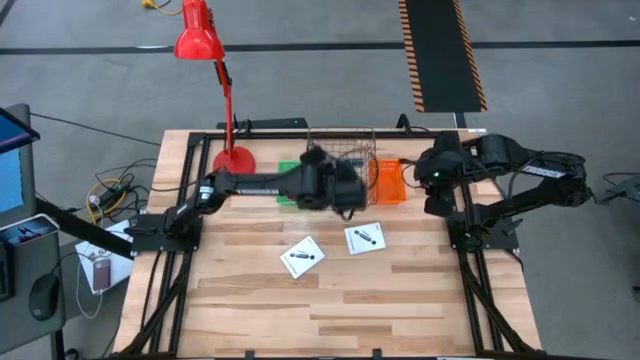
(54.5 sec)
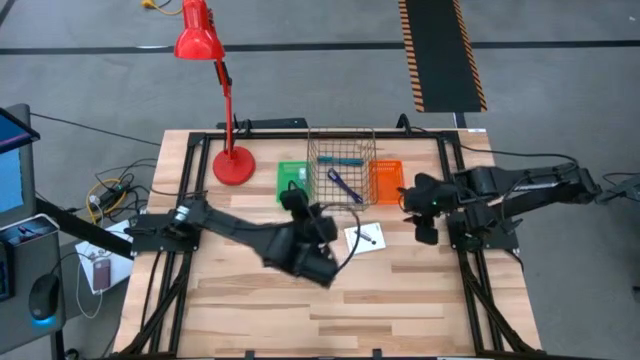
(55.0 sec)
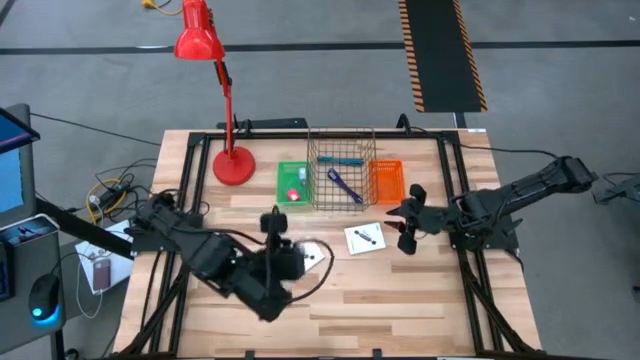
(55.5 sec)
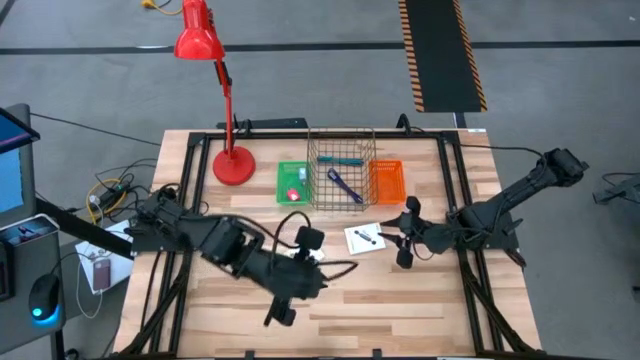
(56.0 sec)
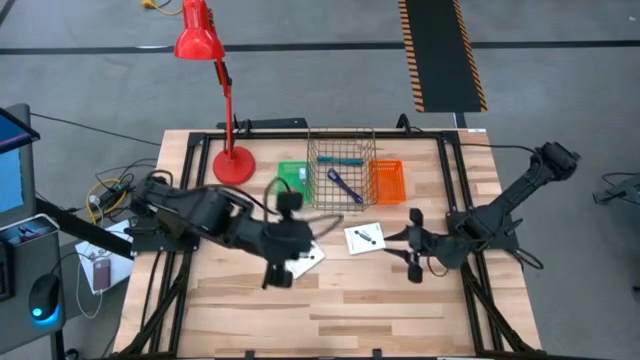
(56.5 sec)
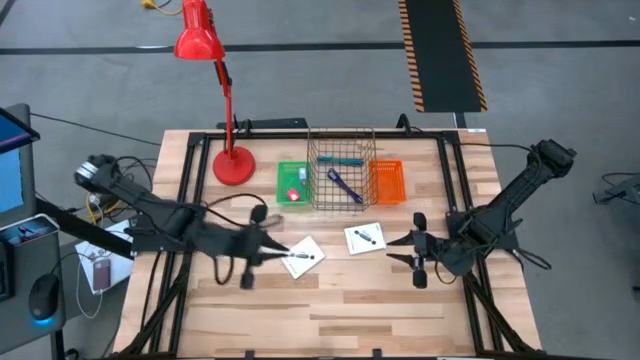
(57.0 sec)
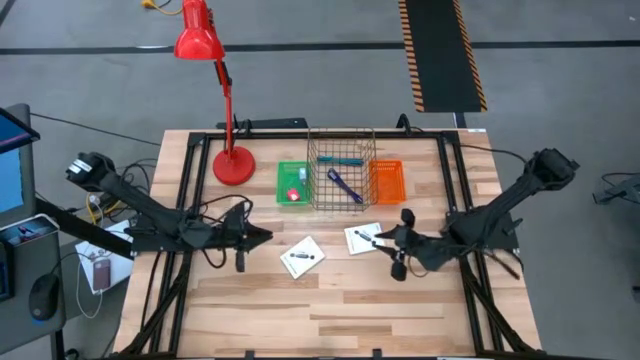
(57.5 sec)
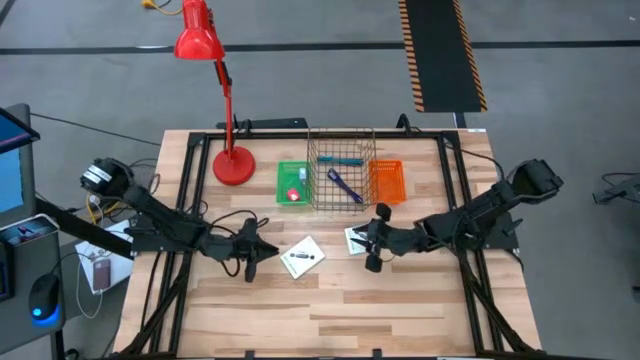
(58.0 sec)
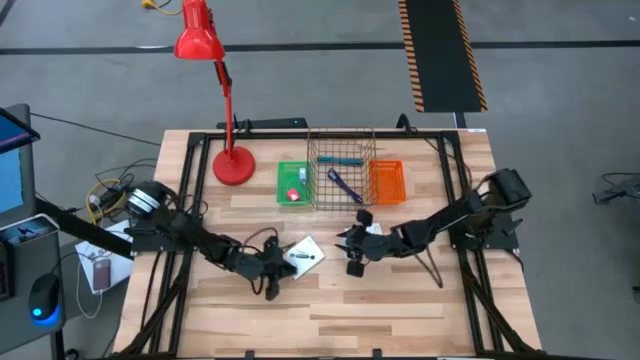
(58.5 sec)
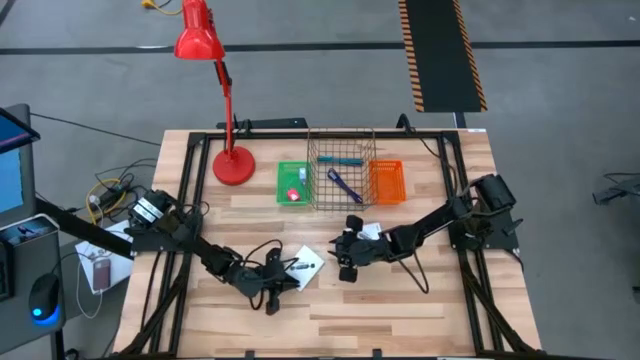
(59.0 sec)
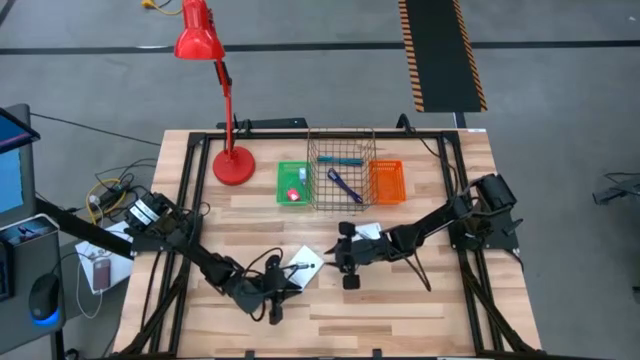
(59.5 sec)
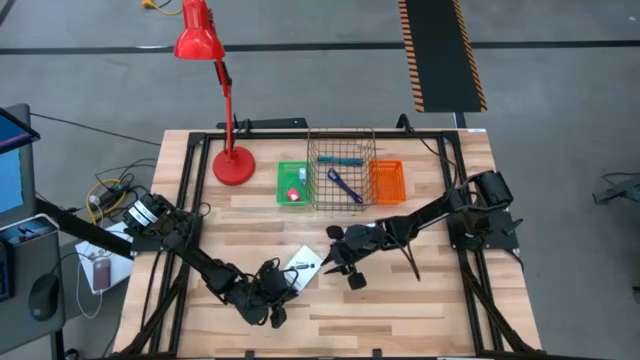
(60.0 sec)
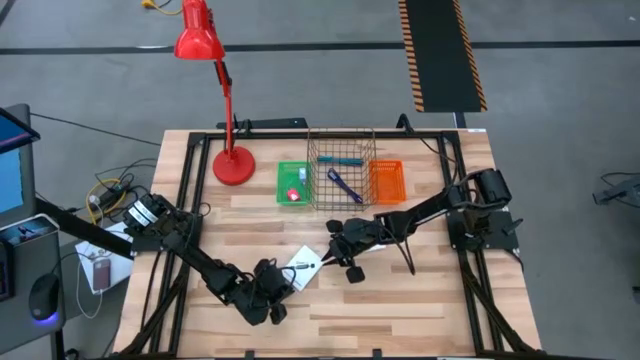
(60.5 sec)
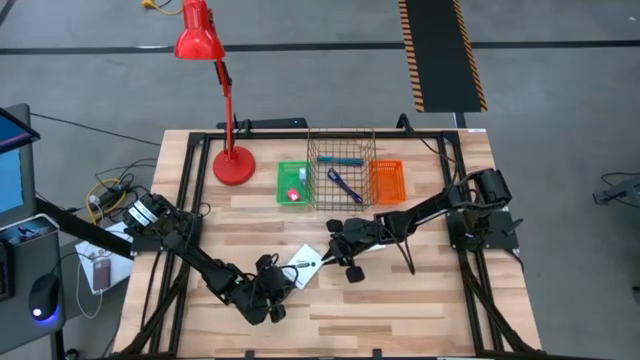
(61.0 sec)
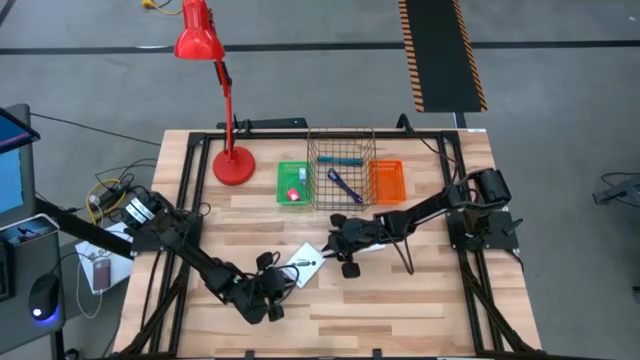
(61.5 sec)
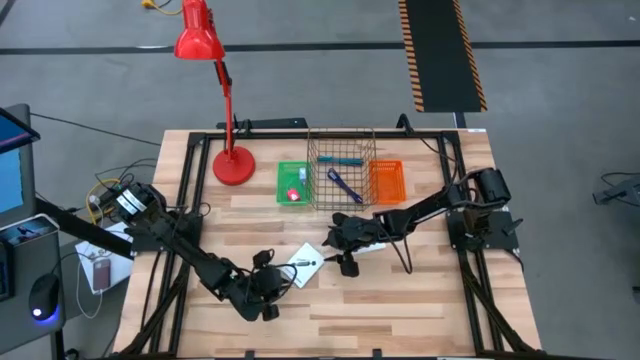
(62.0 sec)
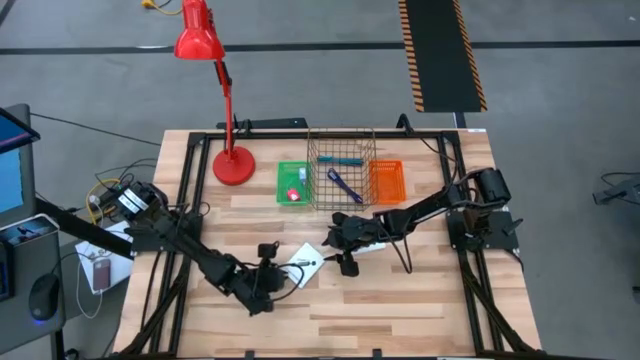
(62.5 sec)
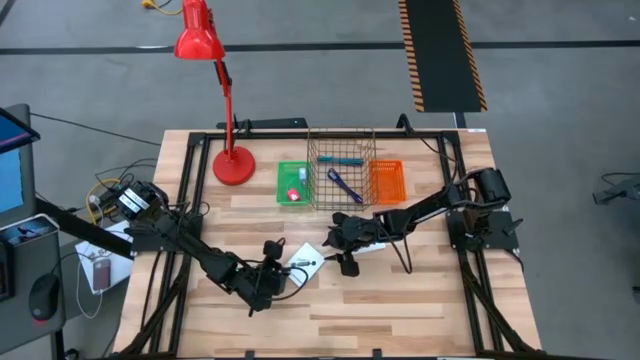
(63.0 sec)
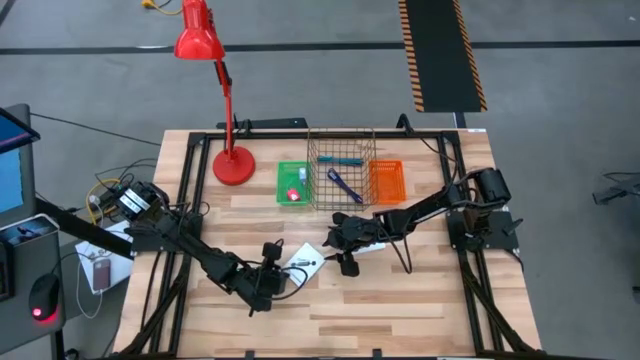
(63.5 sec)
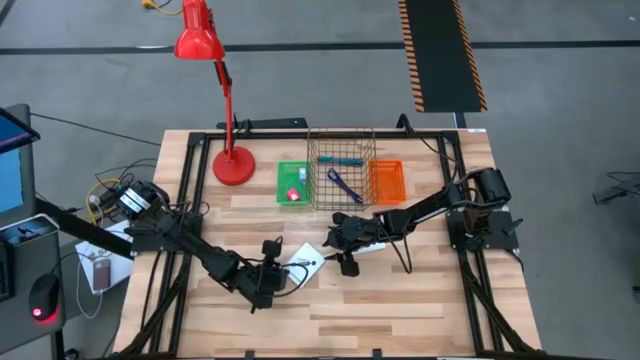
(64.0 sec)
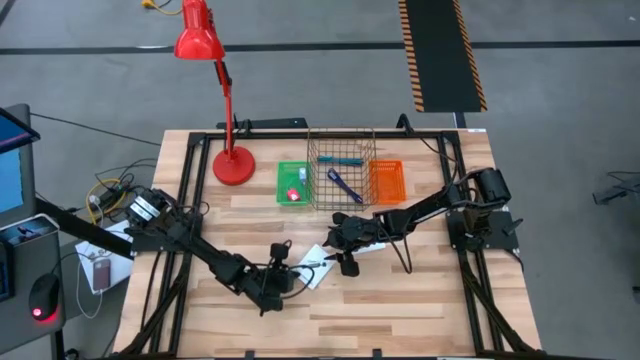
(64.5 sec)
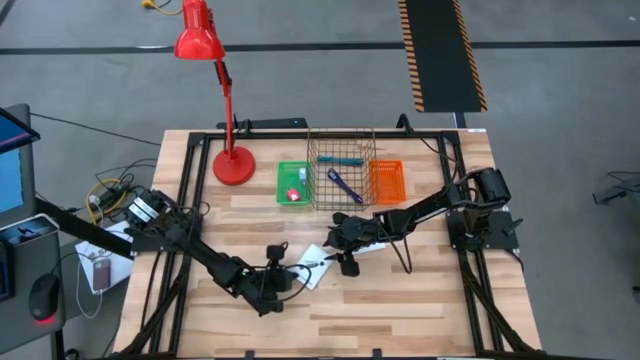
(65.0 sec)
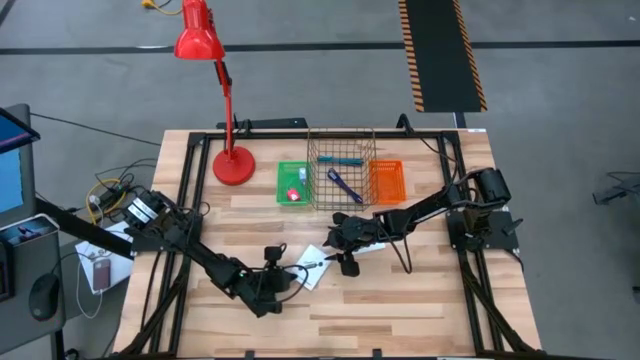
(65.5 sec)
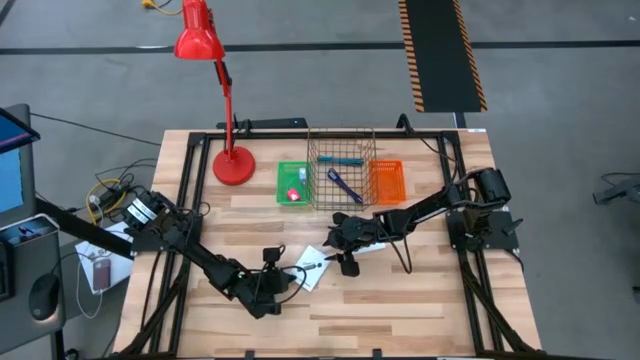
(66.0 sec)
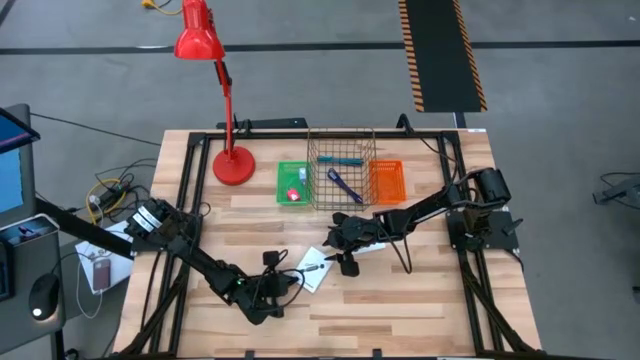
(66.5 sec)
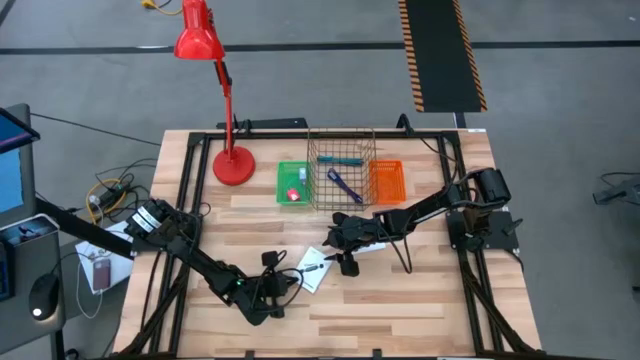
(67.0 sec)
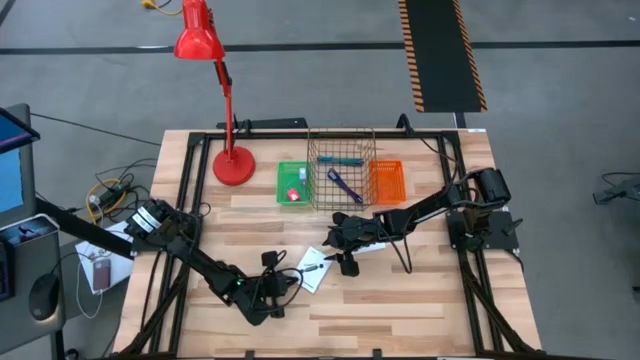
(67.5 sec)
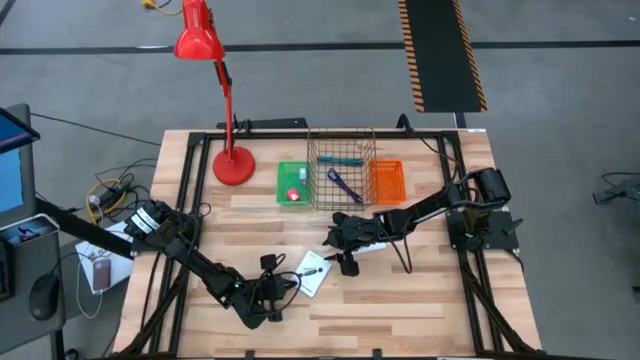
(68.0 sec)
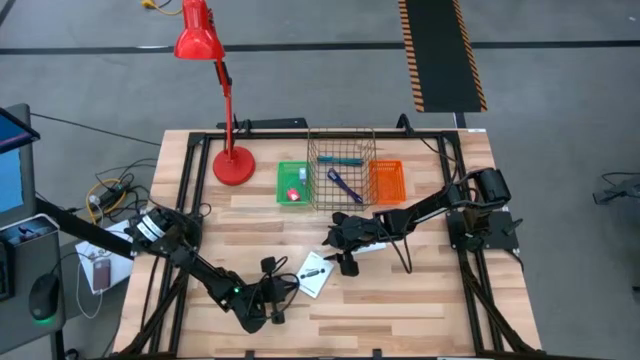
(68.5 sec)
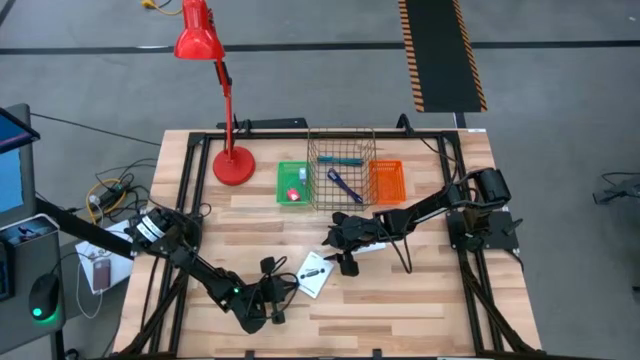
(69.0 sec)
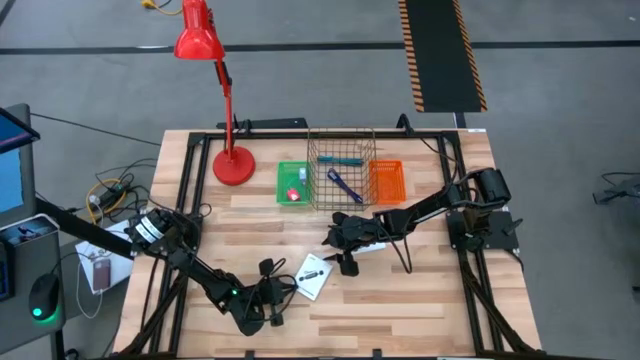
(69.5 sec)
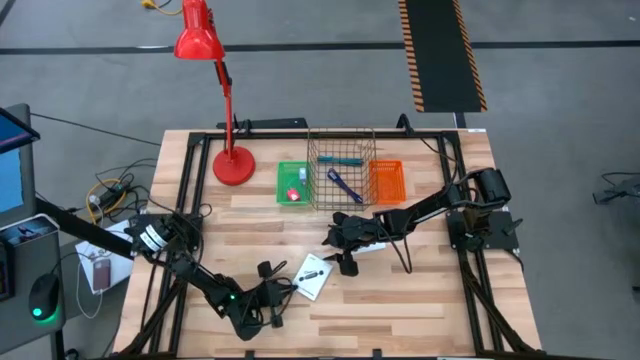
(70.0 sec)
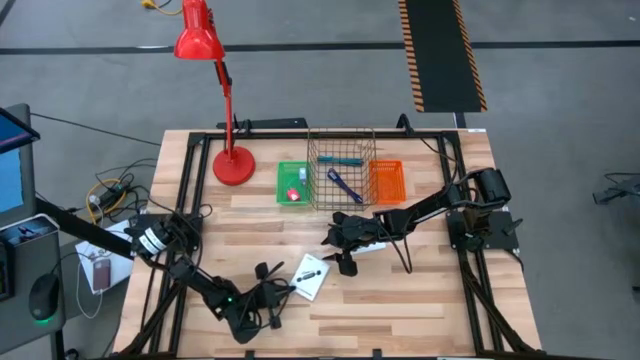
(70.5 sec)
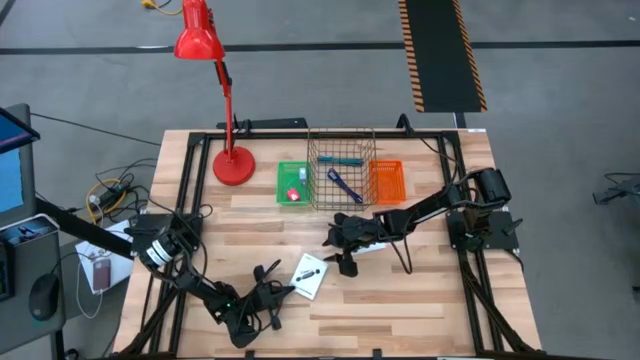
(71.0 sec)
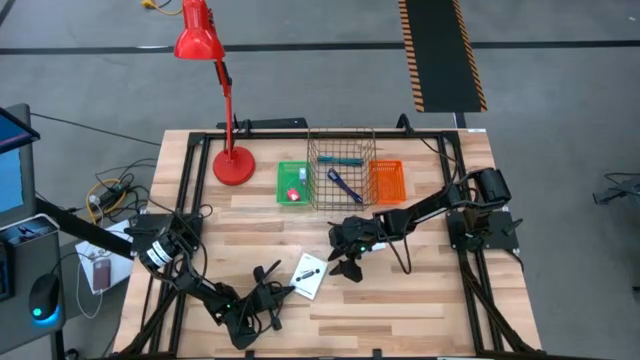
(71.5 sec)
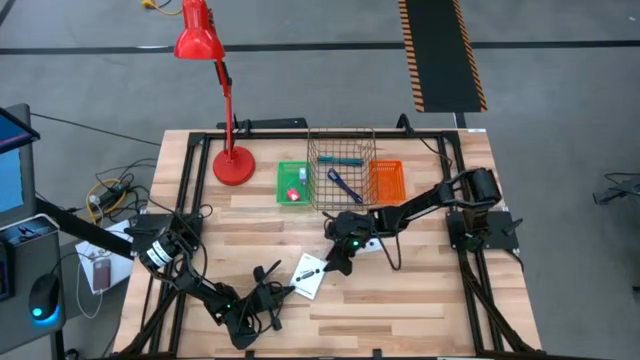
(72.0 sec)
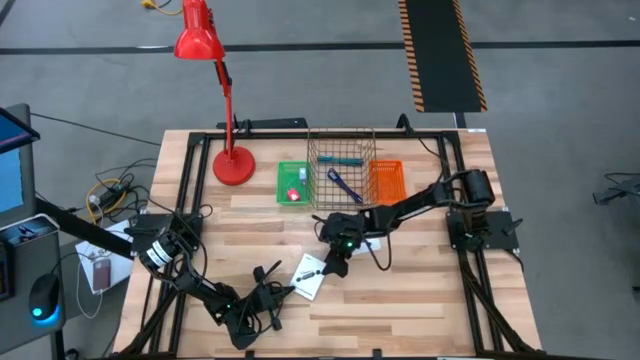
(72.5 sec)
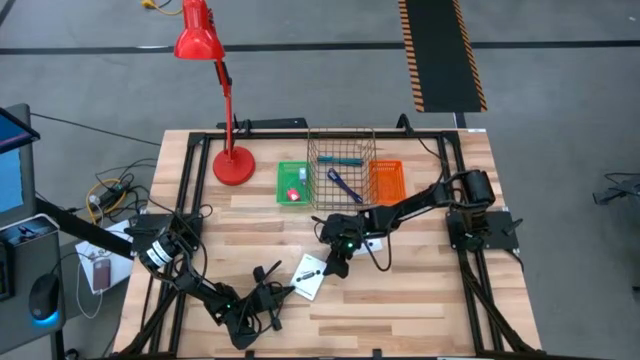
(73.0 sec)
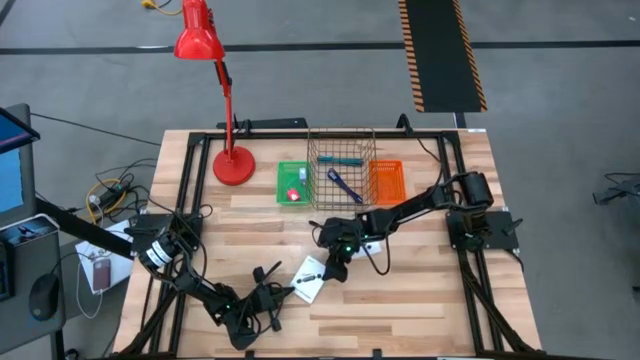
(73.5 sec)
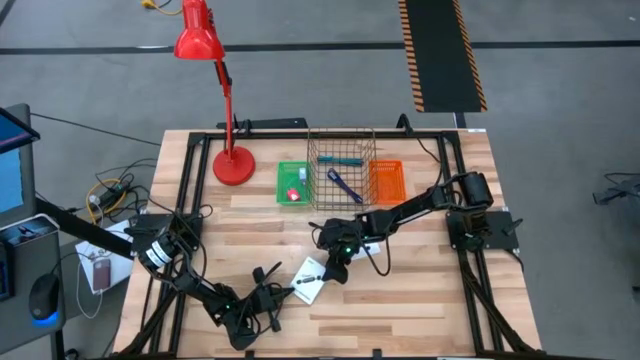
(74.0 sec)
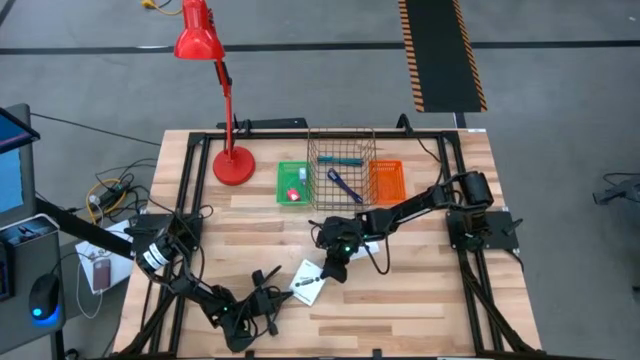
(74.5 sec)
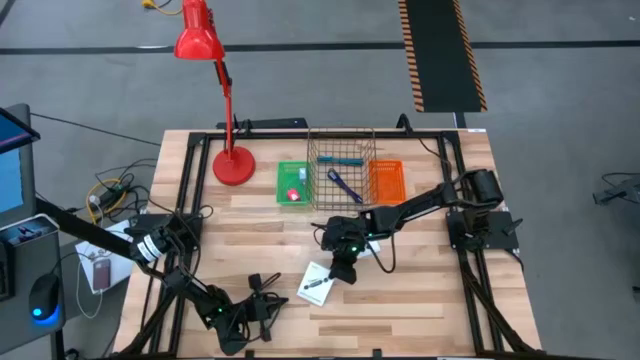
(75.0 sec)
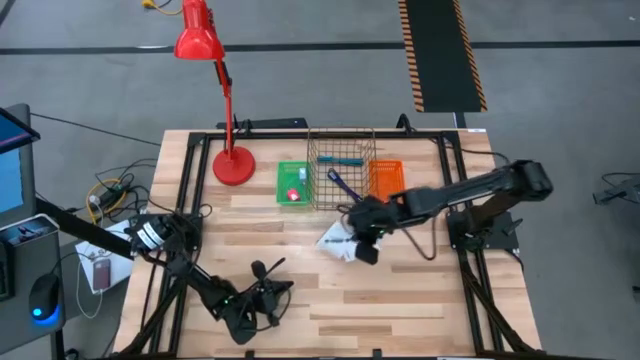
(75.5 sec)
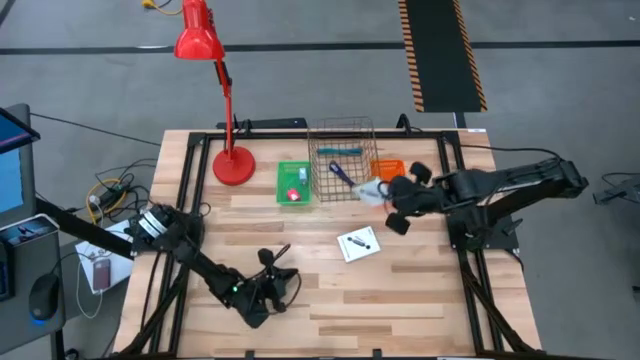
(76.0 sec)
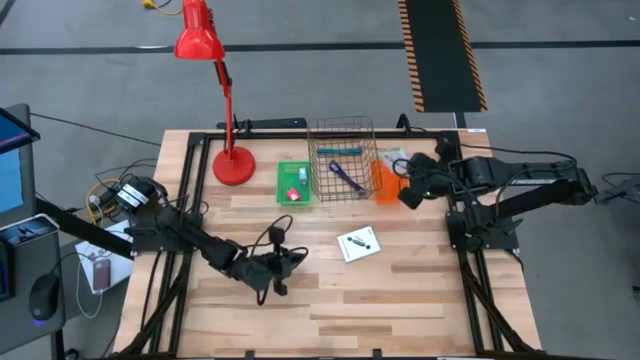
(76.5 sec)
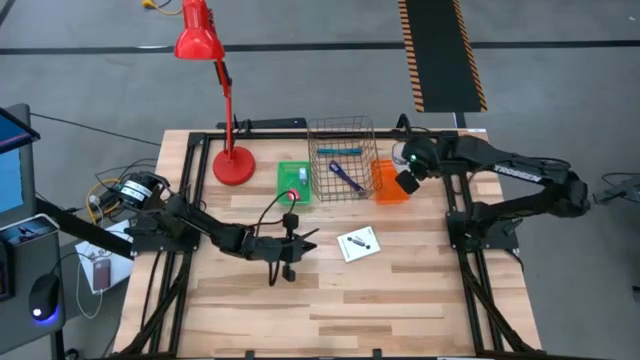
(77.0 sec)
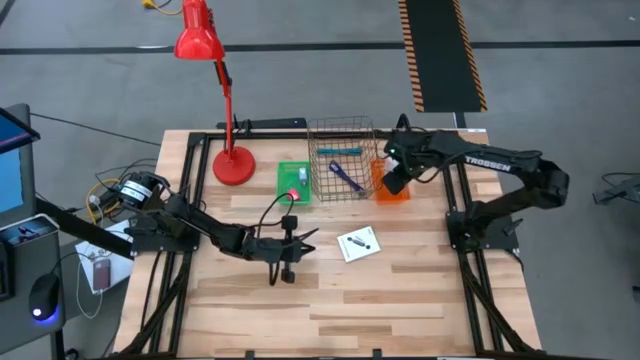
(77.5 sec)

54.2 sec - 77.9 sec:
Task: Pick and place items into bin
Put the left white box into the orange bin
